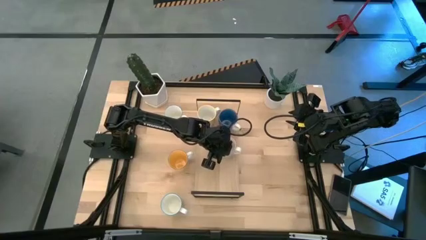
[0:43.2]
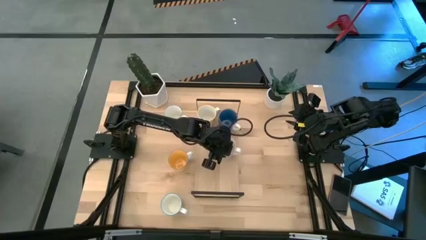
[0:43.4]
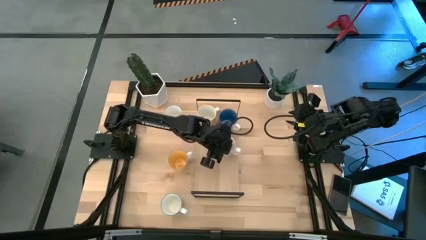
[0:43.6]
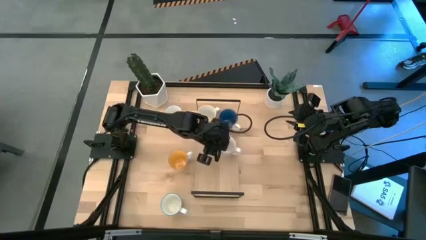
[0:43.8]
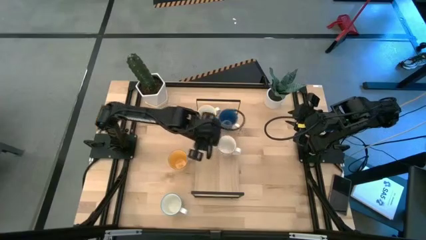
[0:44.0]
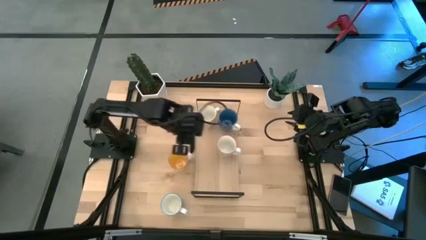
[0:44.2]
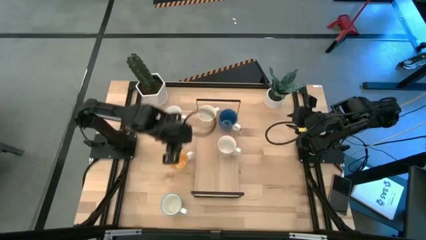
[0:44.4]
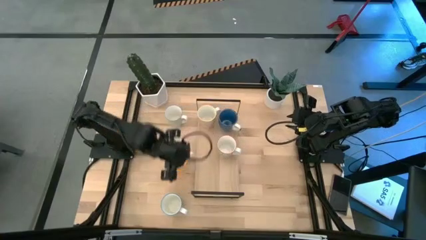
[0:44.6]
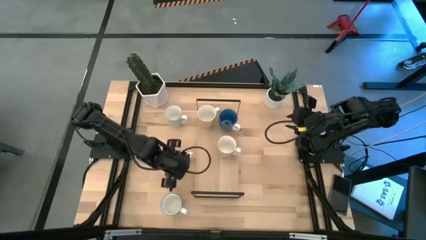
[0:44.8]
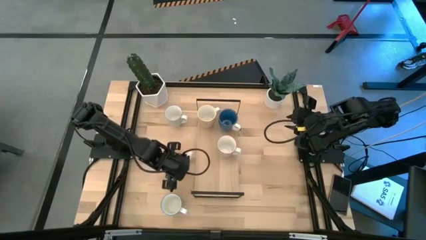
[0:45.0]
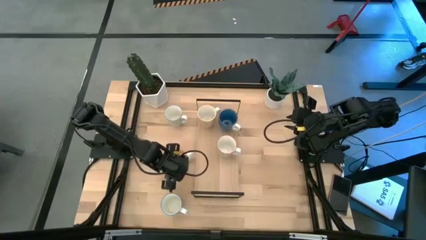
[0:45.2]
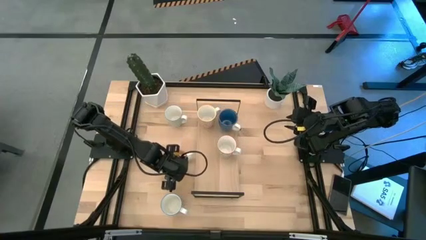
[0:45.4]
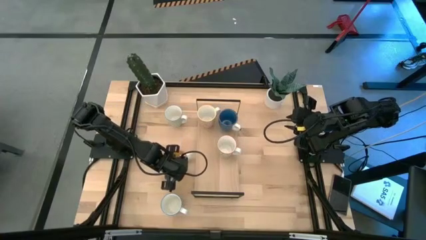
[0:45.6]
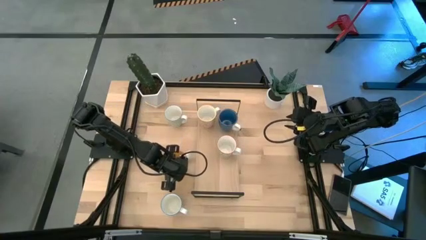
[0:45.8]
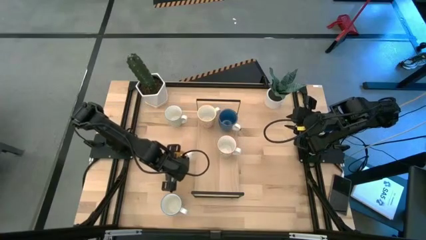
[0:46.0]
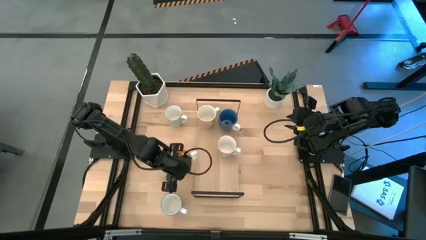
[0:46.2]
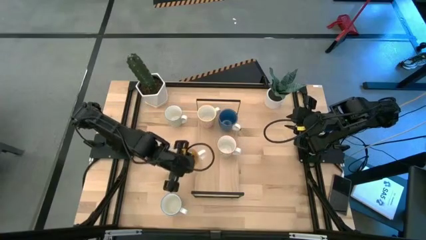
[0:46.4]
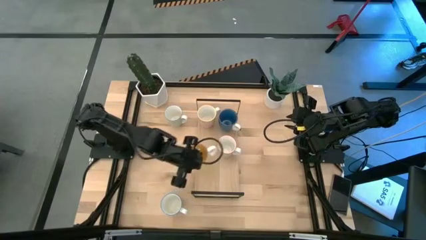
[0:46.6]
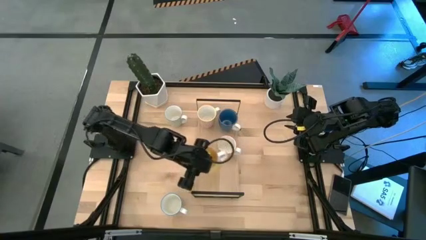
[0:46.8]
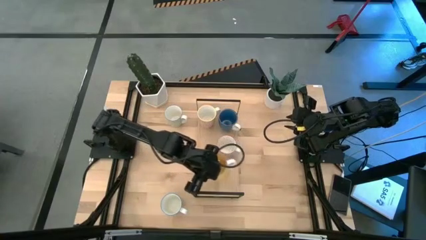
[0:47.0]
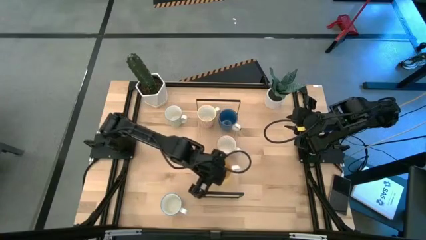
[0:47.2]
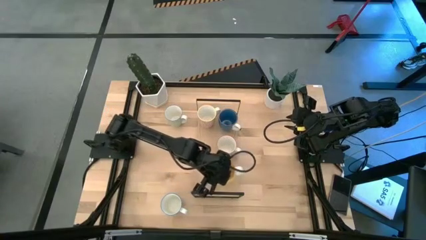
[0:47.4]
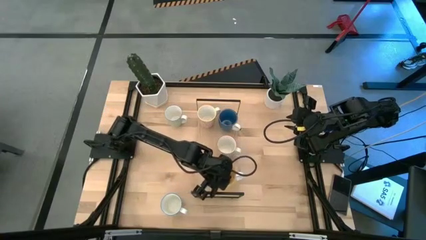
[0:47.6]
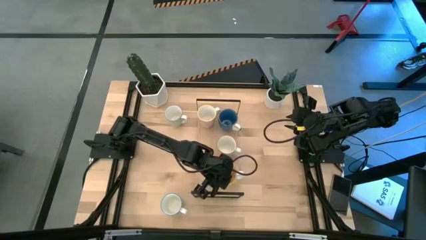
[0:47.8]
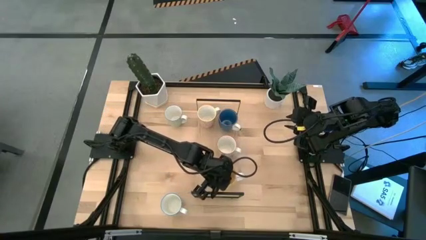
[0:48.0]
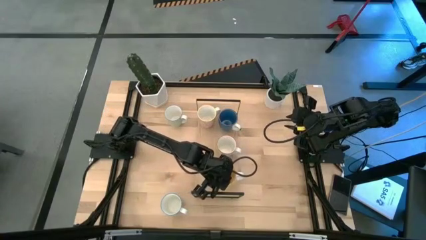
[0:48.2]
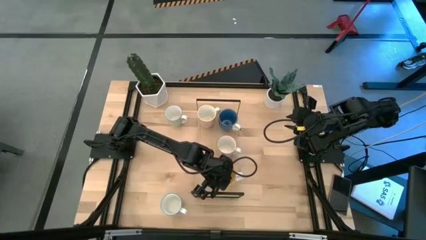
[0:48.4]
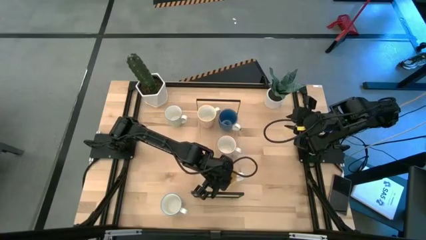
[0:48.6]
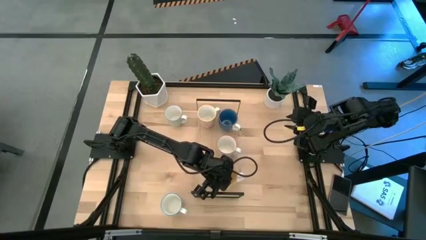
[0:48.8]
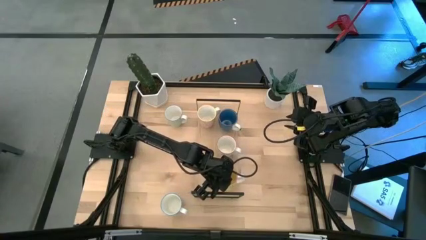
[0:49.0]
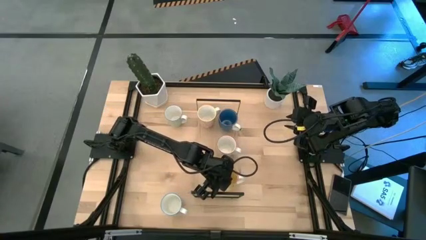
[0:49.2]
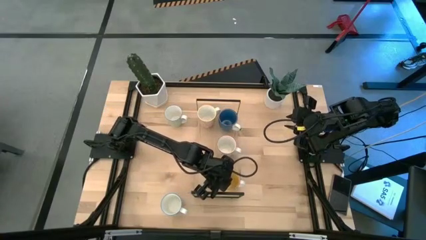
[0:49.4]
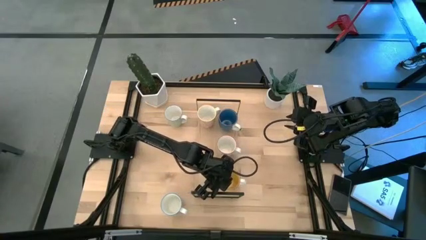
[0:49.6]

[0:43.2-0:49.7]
Task: Place coffee mugs
Put the yellow mug on the shelf

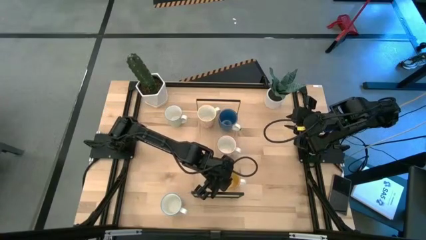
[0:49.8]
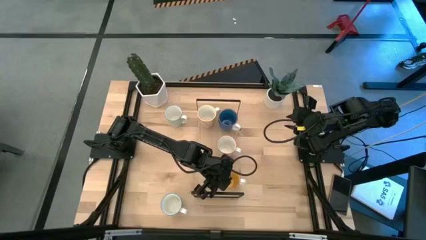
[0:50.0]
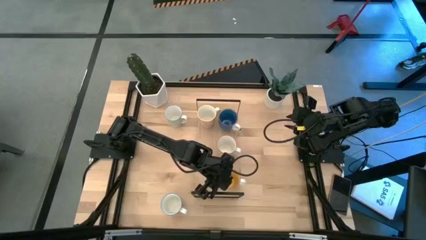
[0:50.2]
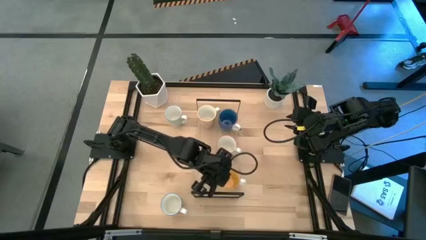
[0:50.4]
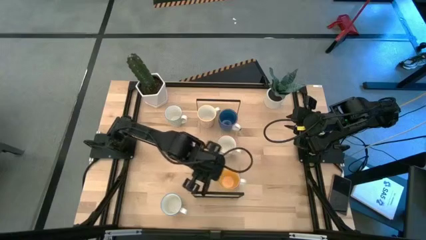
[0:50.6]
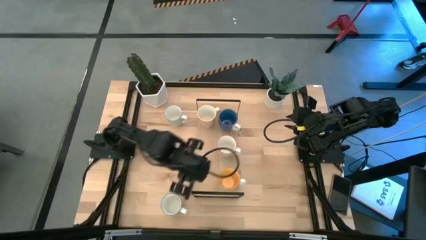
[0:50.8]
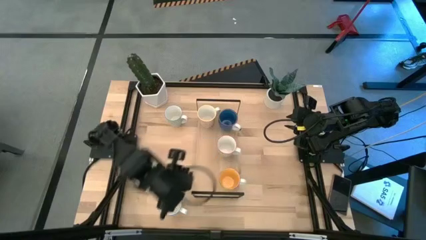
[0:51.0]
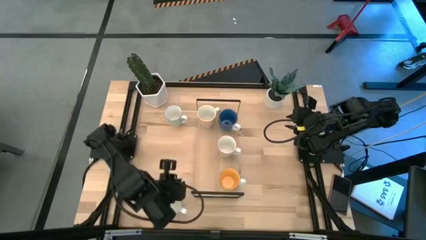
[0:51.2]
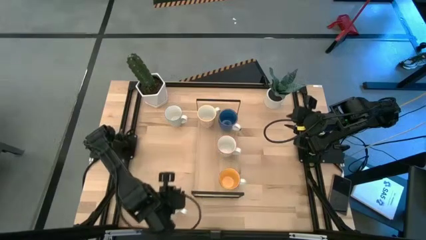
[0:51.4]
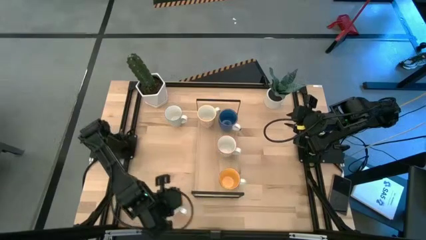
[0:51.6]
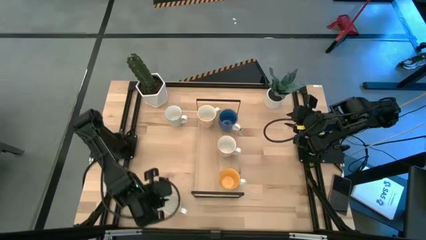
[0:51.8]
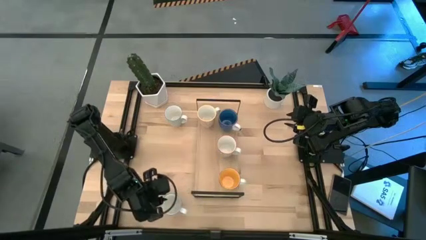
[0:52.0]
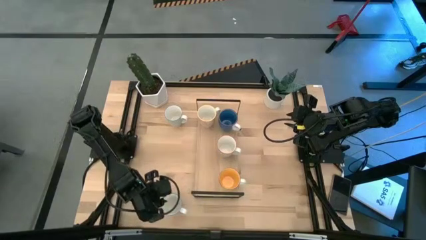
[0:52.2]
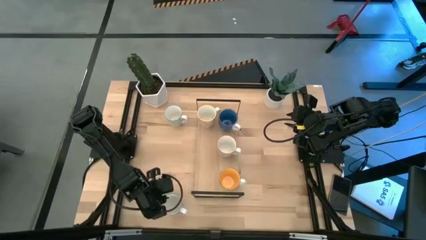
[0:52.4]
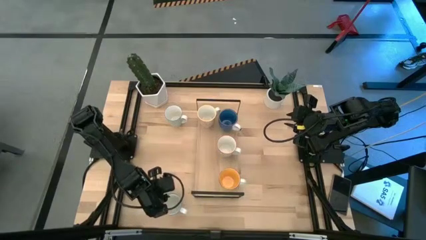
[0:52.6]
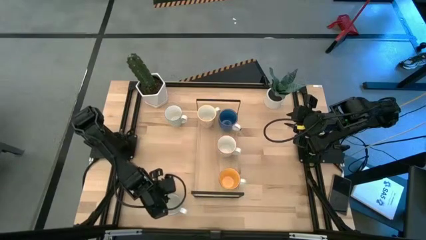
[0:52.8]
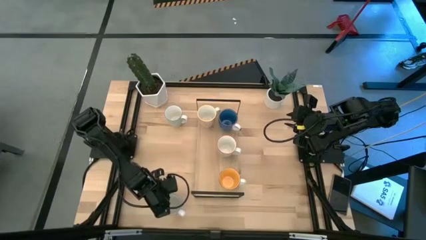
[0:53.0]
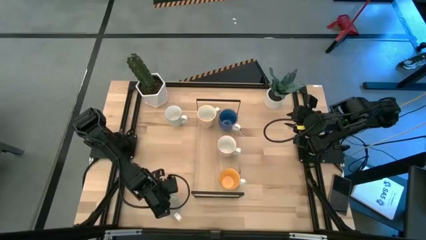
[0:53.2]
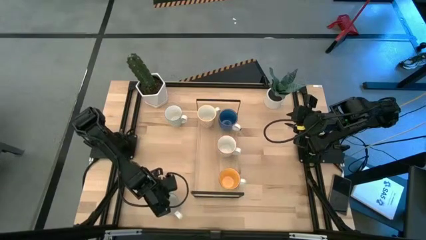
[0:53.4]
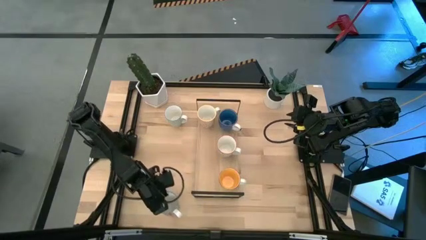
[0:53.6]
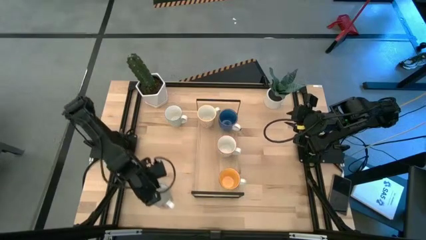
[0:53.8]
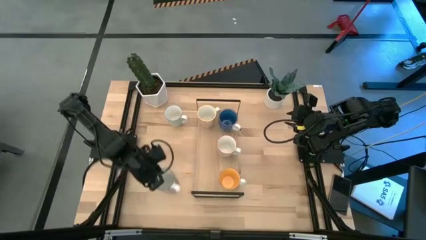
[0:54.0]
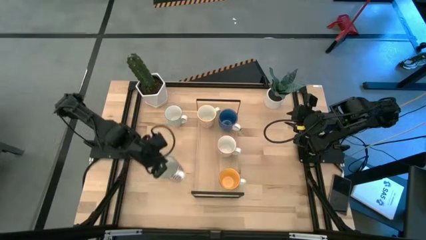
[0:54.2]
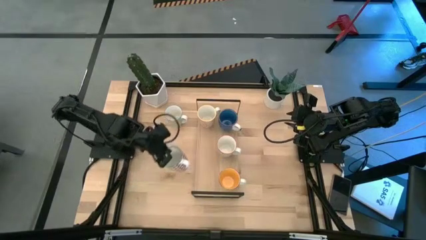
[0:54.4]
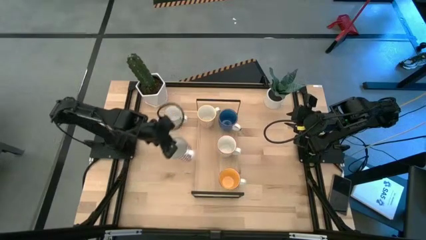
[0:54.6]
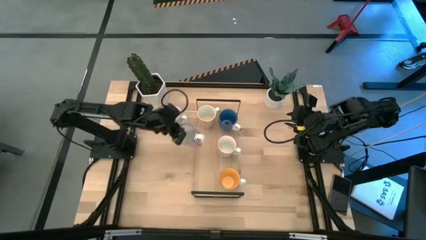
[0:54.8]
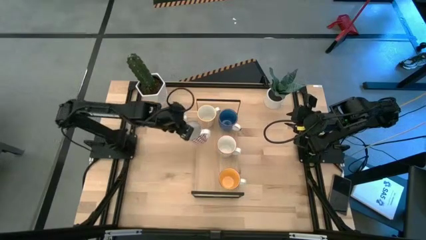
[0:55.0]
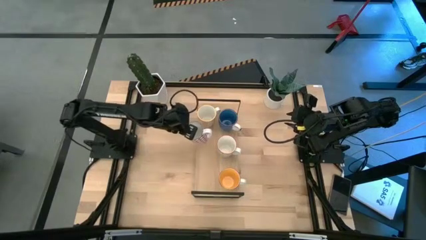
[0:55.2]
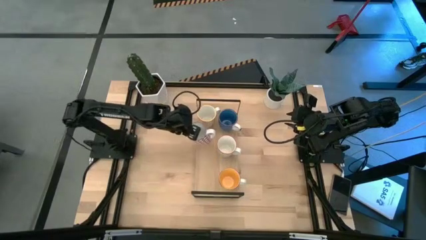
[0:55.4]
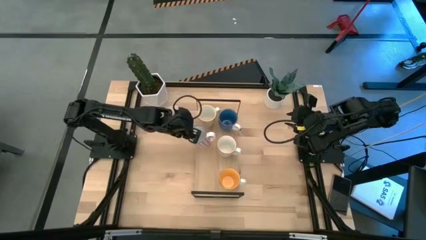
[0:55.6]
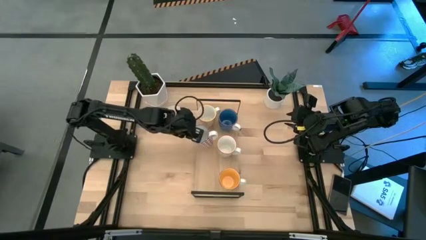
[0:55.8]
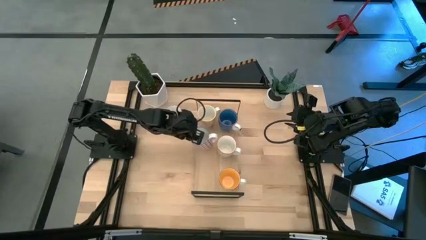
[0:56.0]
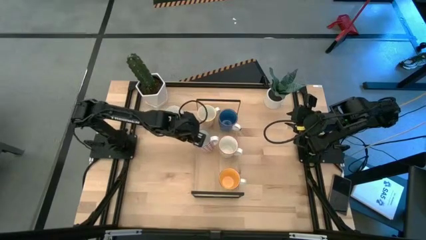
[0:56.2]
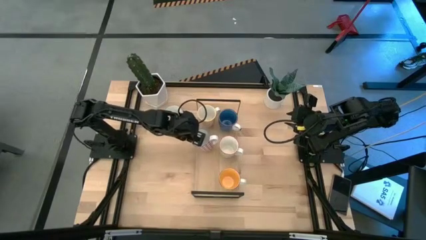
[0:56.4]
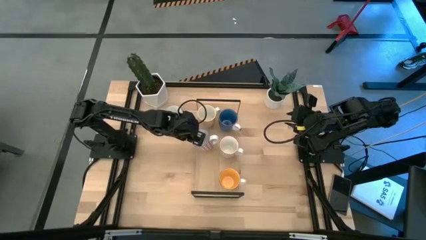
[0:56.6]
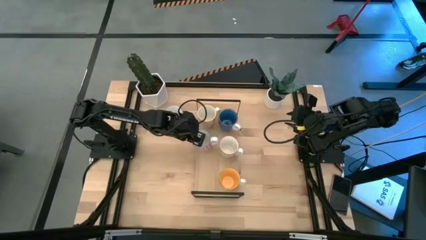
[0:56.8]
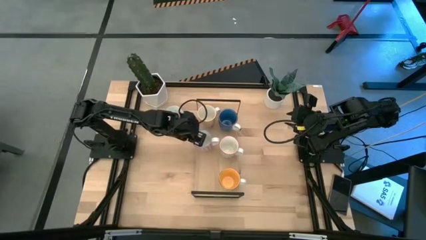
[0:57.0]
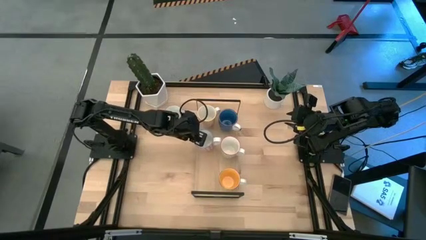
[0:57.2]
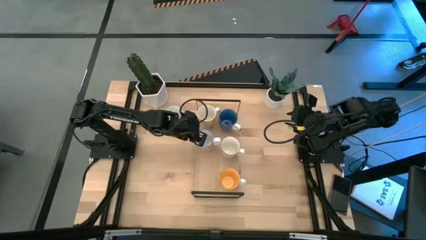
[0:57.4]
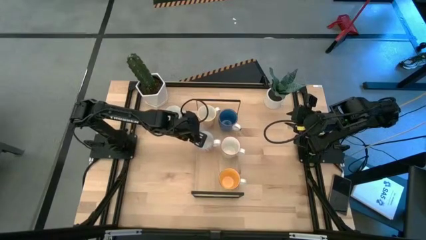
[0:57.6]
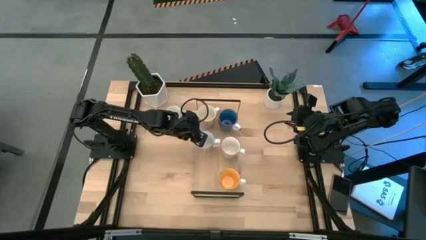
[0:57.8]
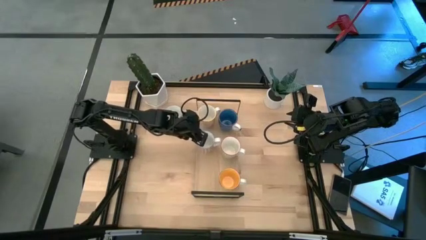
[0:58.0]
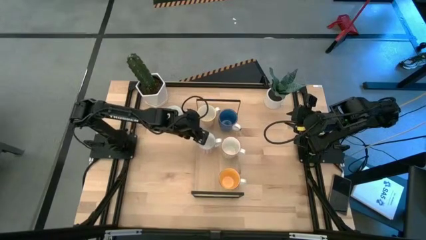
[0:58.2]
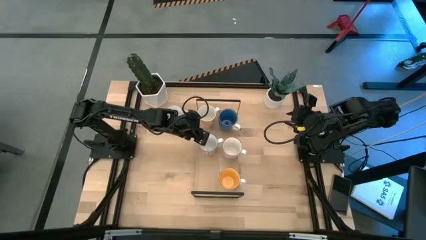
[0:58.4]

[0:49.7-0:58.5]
Put the red and white mug on the shelf

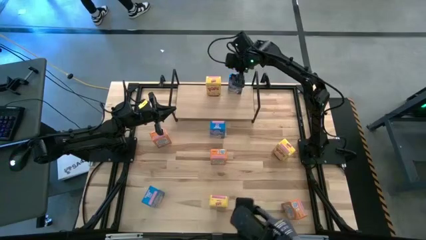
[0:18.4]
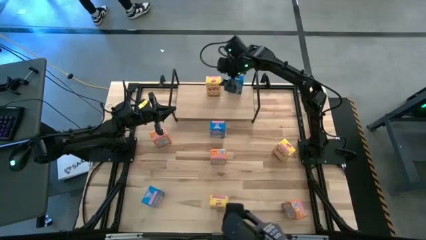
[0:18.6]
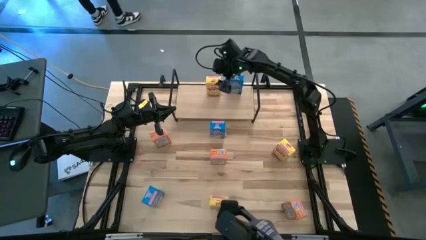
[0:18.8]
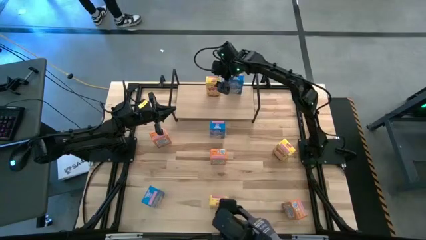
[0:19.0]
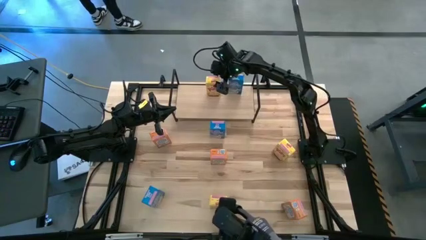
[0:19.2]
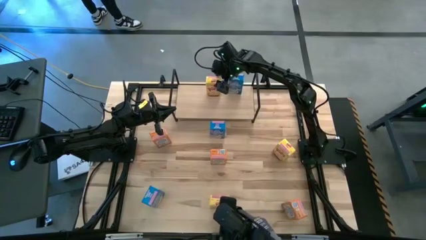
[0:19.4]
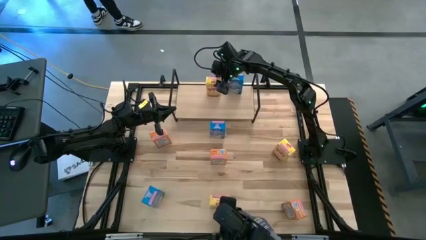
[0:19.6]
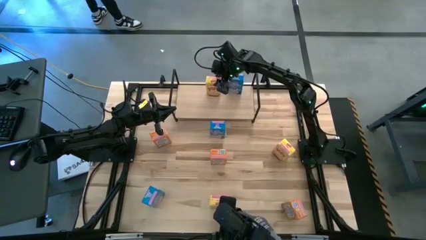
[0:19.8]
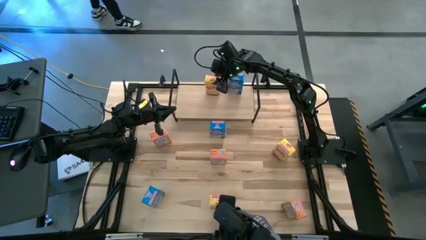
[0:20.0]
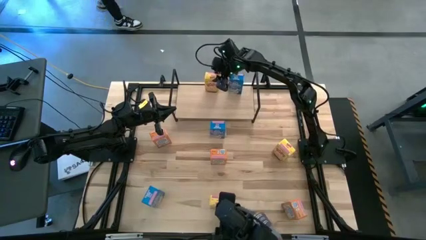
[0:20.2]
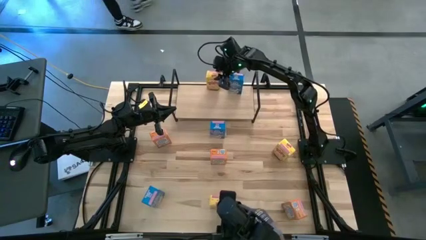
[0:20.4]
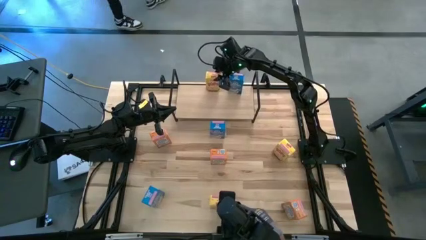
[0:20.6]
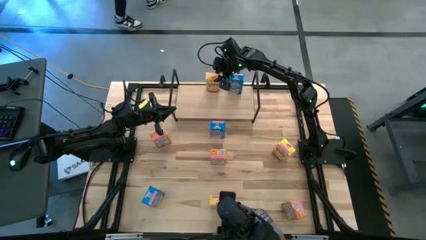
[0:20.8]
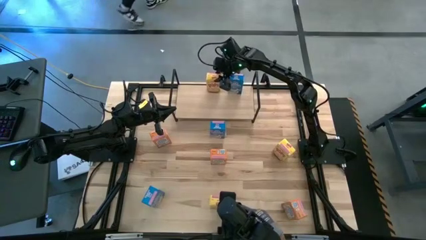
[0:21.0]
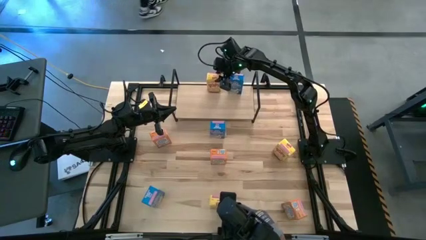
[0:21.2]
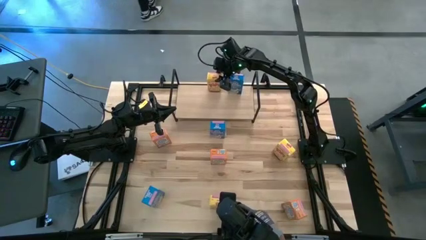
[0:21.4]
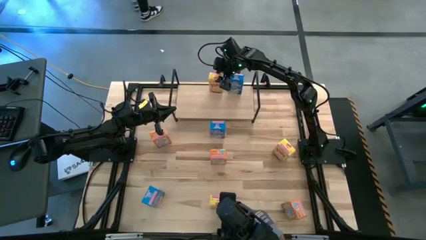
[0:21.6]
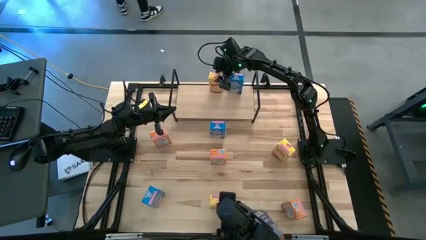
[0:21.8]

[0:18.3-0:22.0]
Task: Stack cereal on shelf
Adjust the yellow cereal box on the shelf
